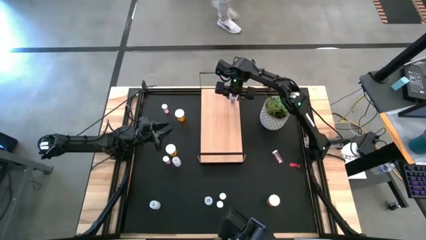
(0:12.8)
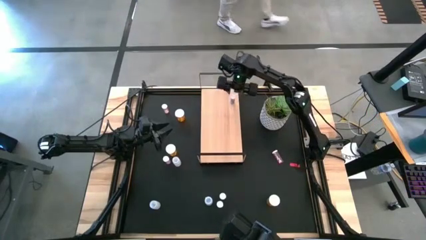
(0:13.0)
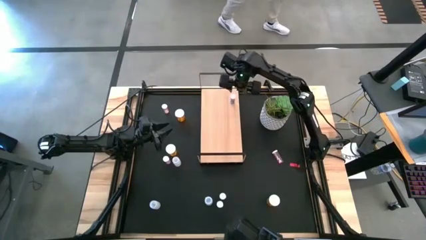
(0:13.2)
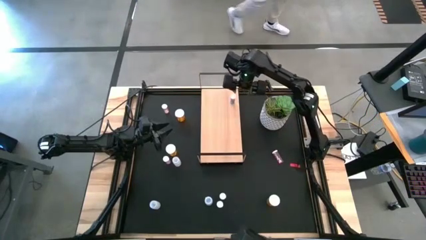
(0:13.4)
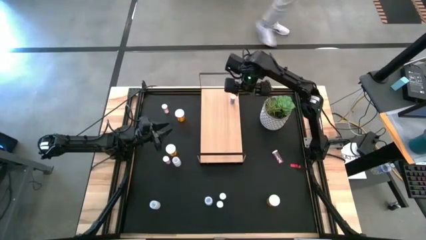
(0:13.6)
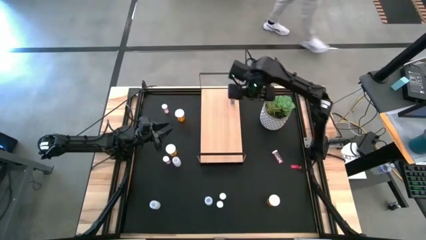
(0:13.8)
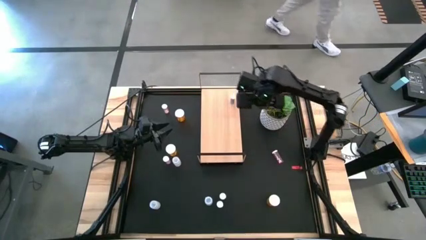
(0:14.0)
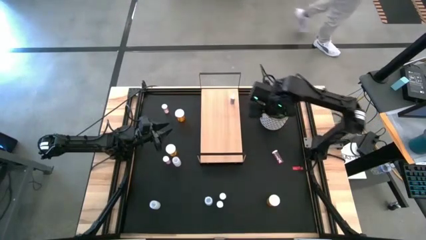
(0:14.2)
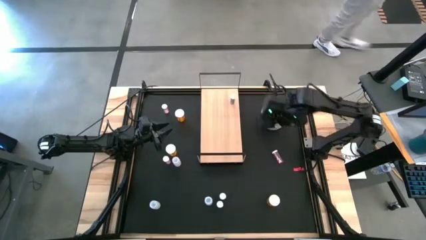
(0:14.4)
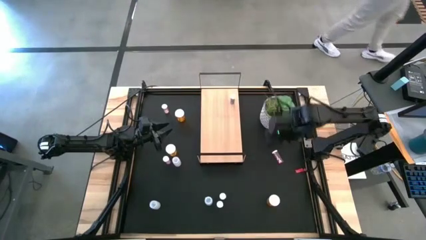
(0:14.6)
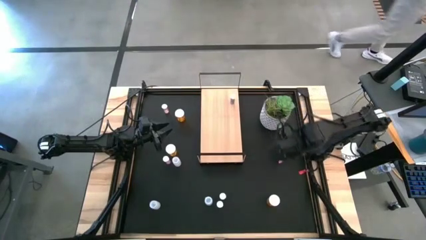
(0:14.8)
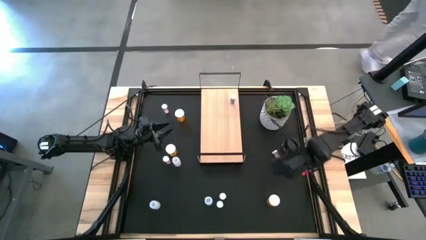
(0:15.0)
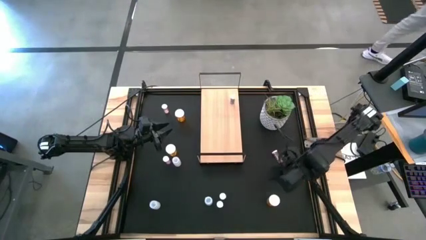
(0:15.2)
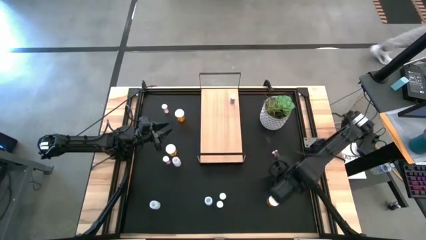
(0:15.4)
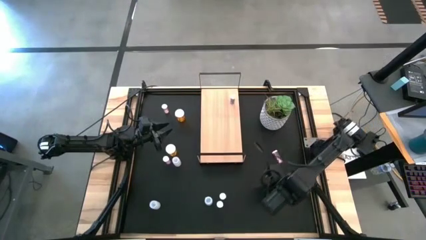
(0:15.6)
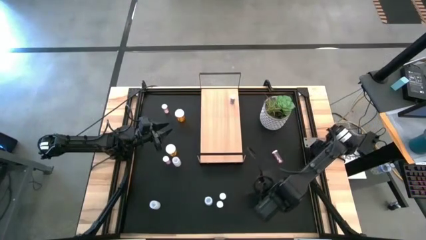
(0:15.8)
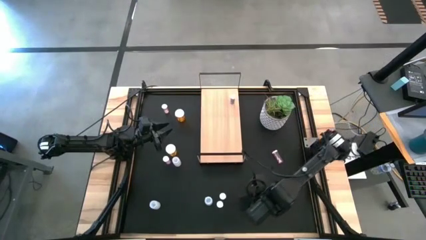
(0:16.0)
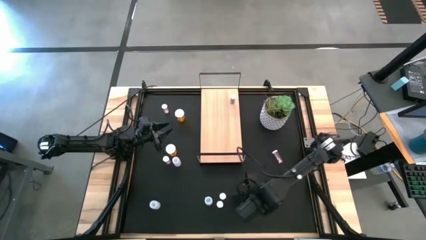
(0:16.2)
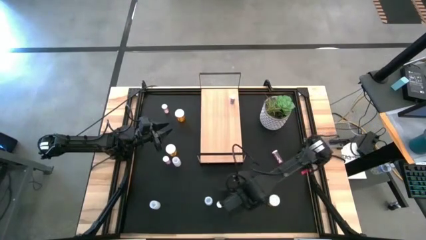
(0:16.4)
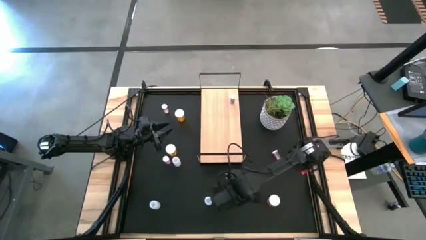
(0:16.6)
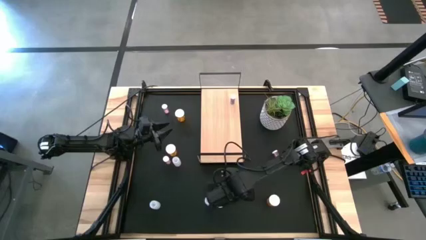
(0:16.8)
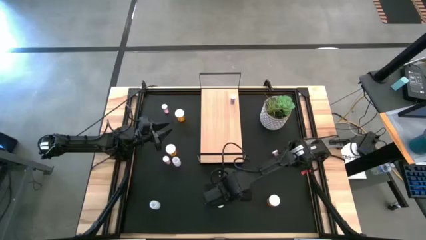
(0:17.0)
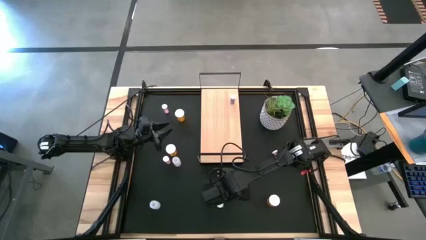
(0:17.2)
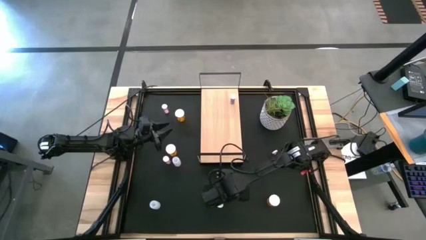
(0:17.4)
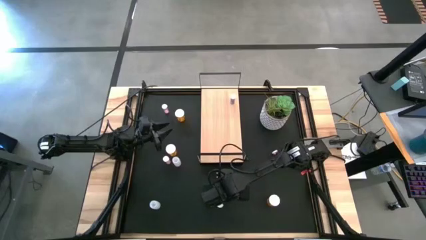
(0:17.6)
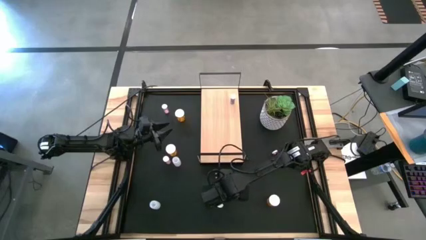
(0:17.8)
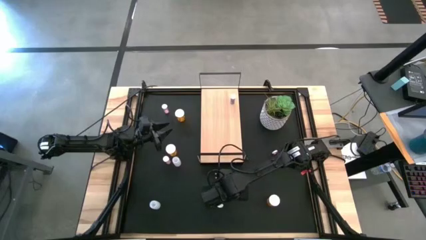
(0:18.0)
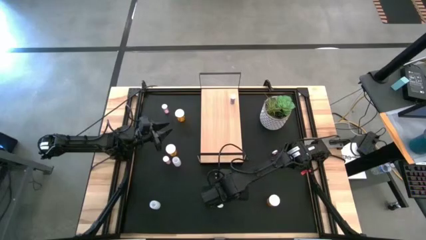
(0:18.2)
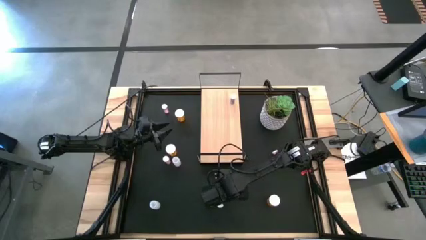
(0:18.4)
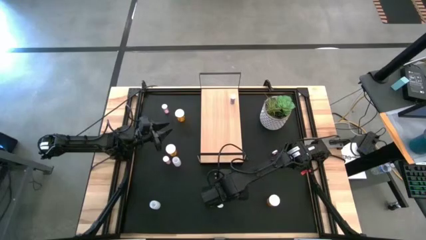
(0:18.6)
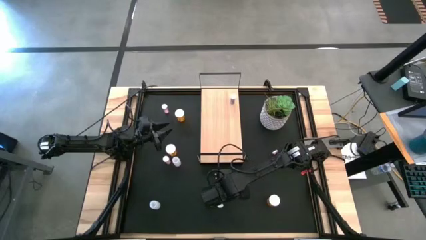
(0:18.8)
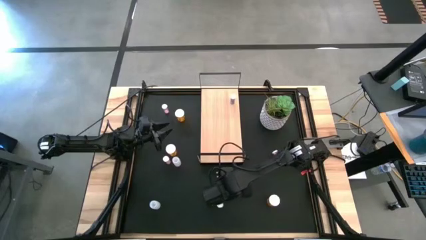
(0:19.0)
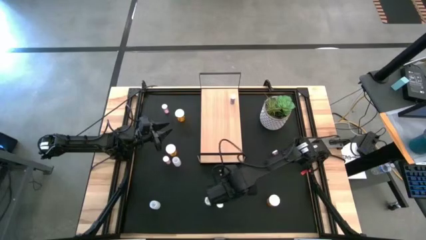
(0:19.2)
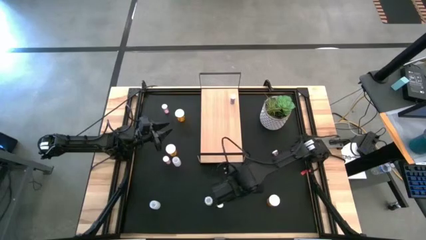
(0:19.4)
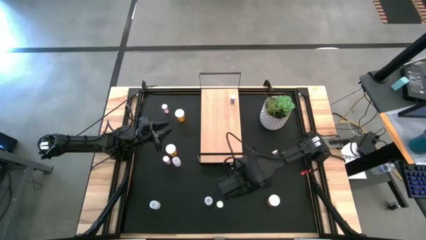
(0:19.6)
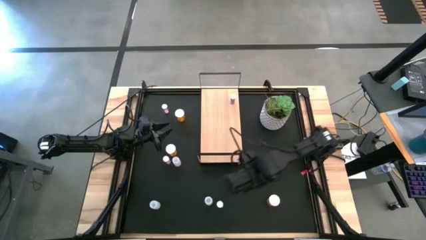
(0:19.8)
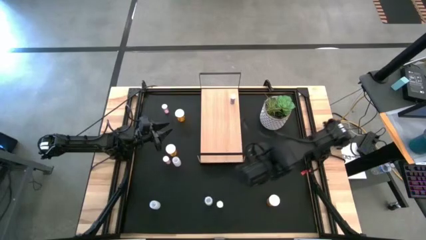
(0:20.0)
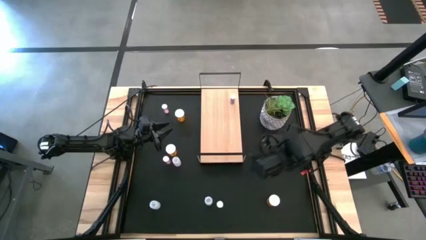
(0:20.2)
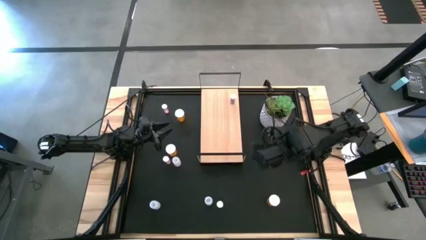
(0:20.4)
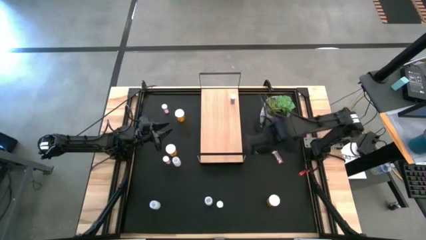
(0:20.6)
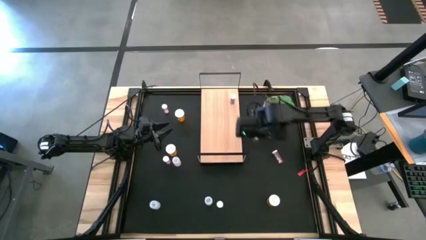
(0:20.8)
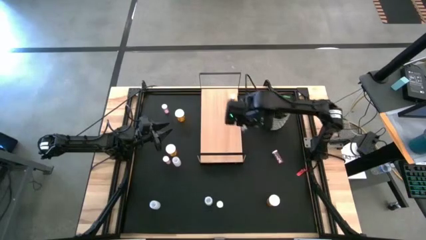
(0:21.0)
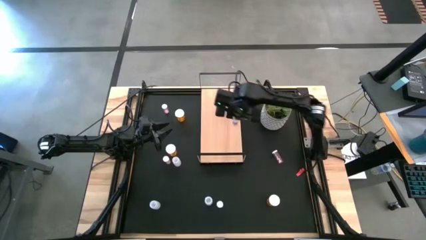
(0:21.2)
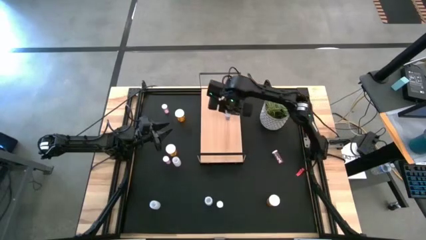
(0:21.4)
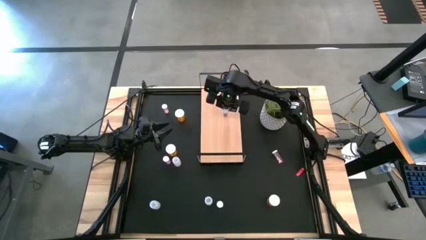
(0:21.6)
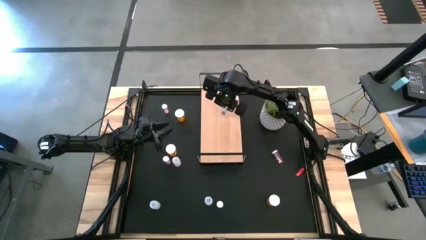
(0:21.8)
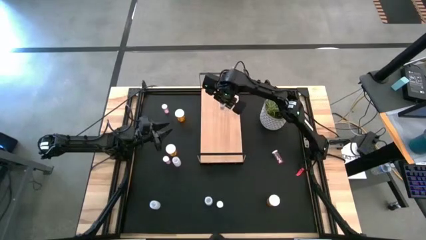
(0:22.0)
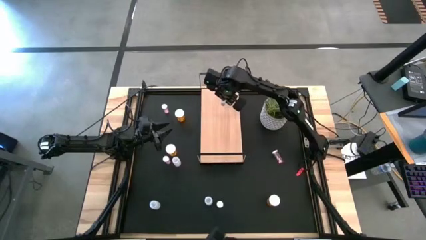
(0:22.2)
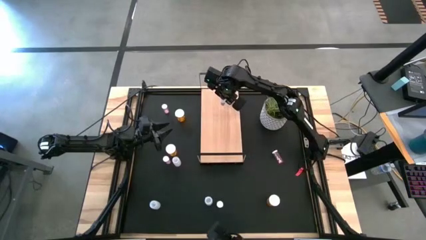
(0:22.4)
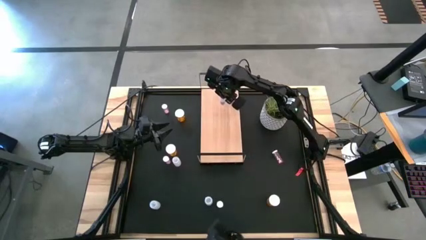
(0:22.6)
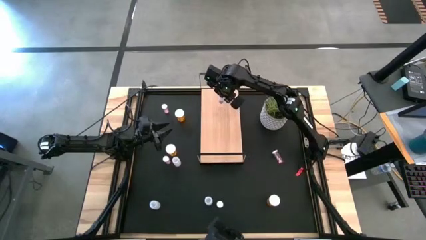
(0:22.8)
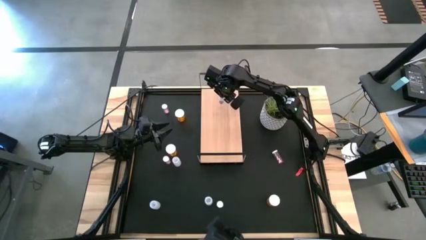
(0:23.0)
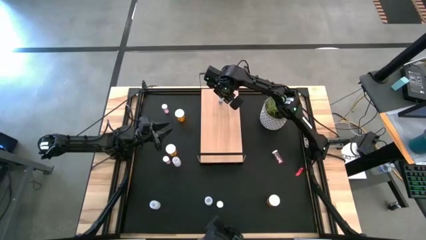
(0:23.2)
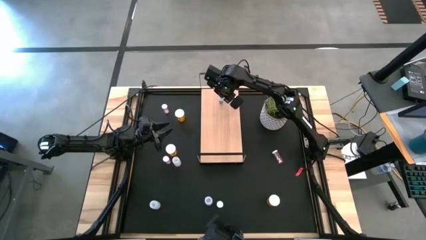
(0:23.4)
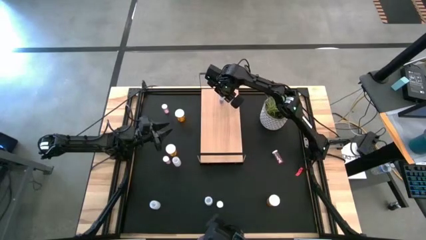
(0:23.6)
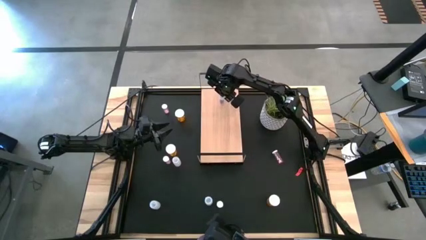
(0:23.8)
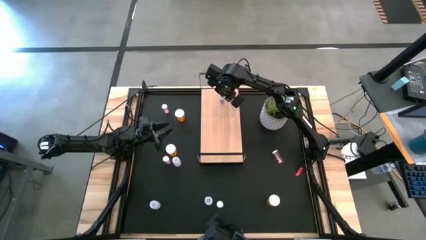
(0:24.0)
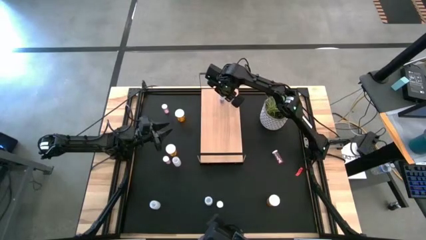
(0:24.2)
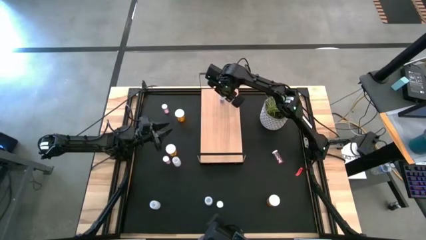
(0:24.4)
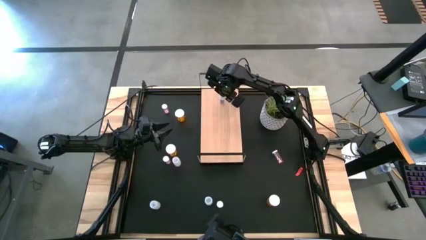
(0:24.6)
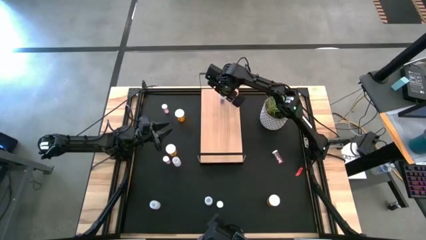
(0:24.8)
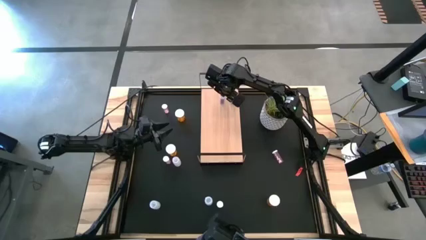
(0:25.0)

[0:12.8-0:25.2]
Task: Pick and place medicine bottles onto shelf by color
Put the top blue pill bottle on the shelf aligned with the blue pill bottle

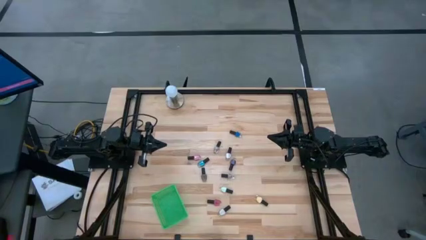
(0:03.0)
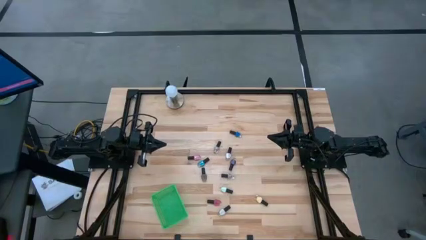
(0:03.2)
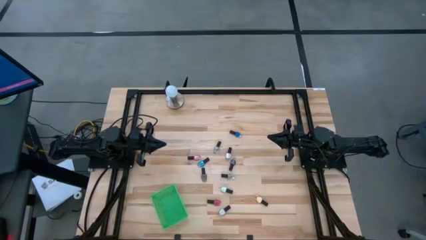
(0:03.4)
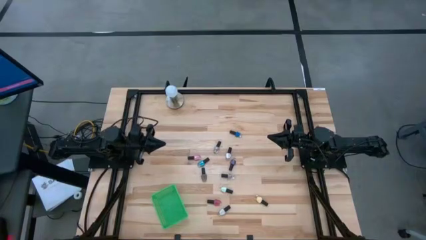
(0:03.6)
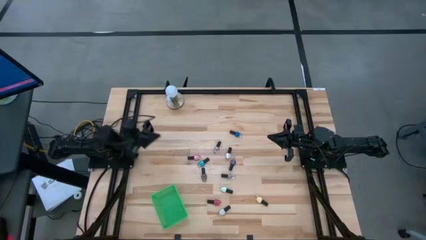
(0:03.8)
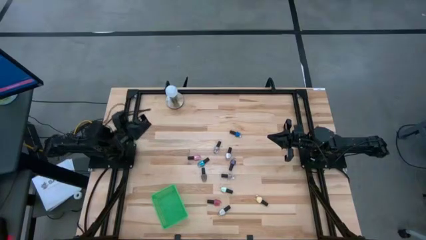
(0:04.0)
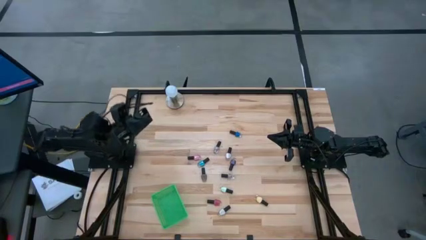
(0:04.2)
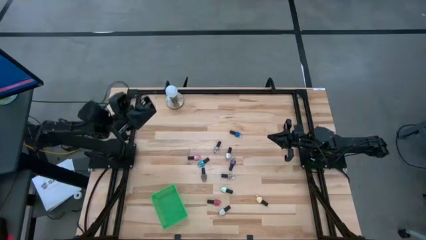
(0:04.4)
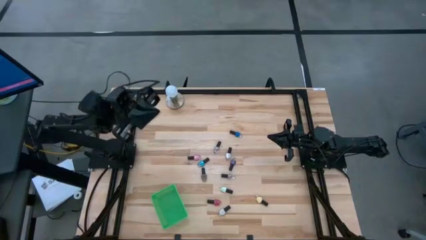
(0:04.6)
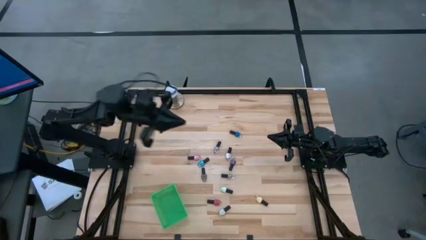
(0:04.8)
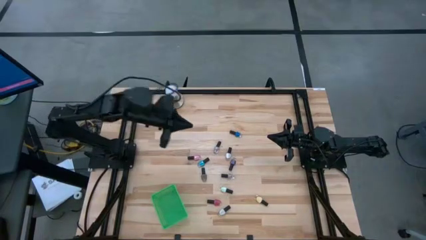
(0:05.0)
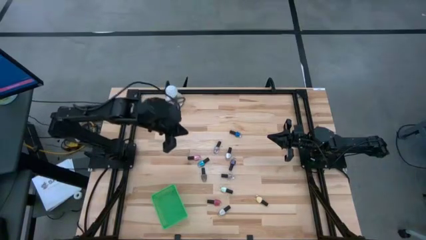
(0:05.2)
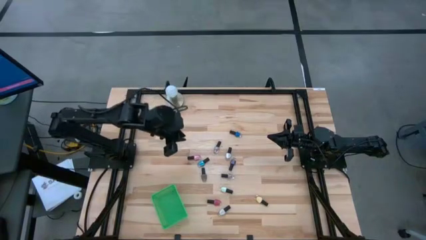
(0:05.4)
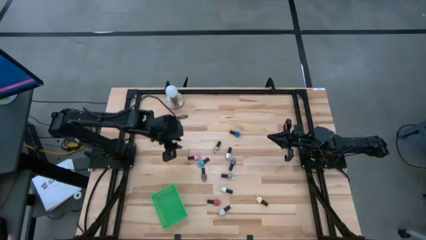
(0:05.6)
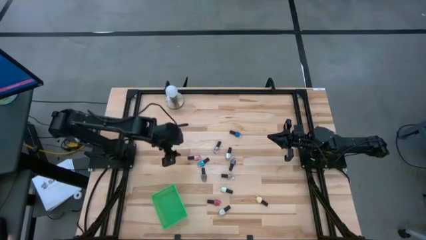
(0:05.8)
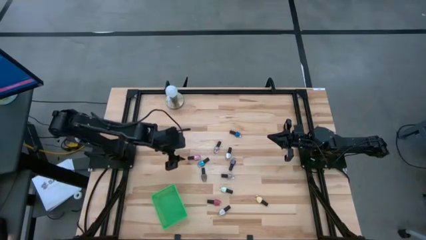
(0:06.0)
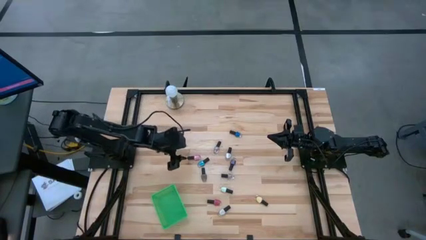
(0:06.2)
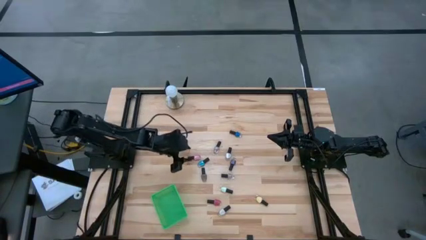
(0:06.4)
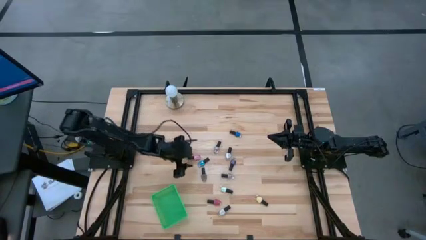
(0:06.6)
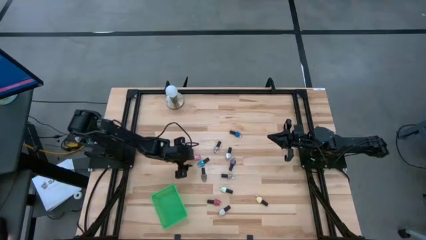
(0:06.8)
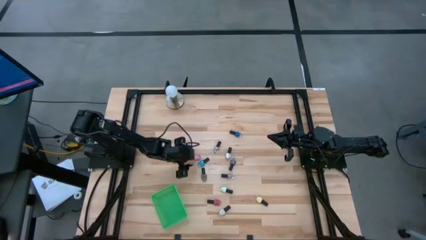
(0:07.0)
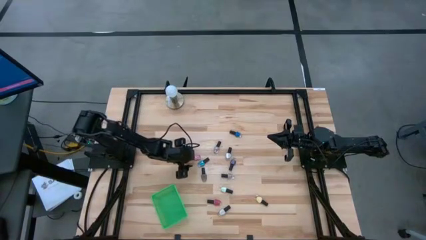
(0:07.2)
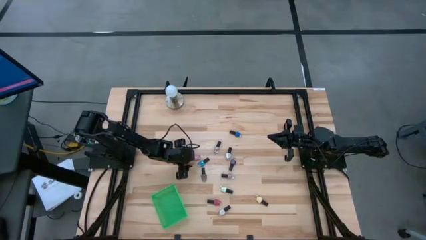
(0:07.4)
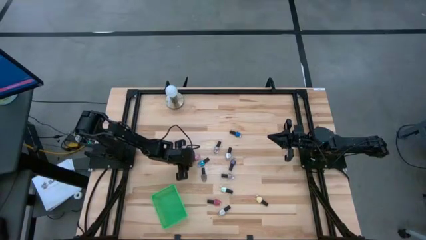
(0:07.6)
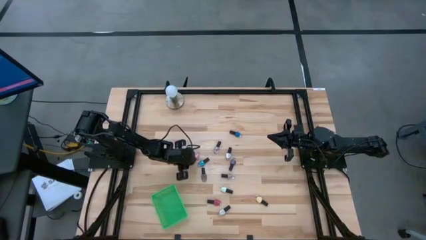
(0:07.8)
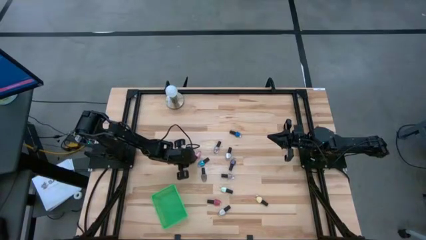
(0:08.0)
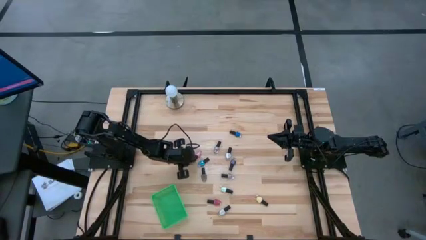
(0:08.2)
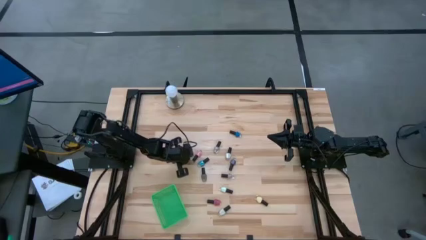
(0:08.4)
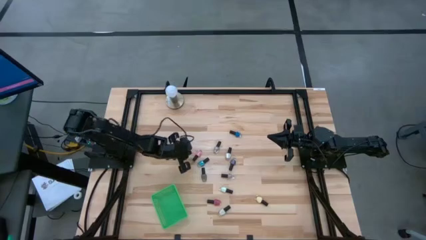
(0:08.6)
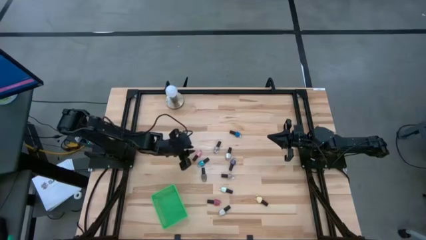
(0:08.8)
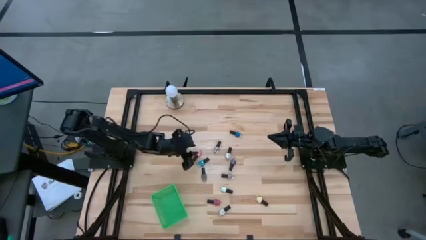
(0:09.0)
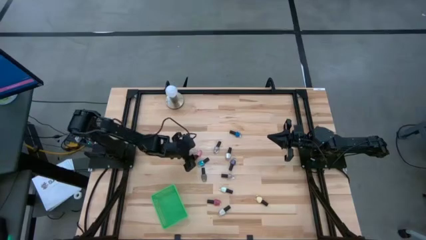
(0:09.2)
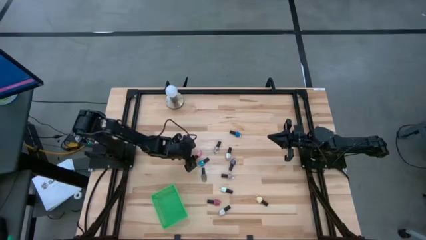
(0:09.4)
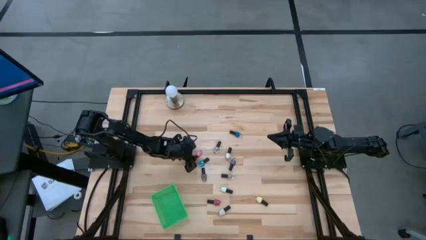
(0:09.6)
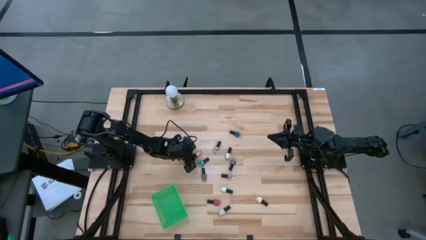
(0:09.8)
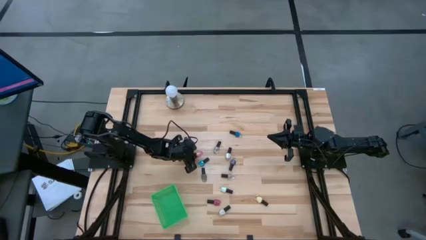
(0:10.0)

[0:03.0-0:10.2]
Task: Pick & Place Nail Polish
Put the black pink nail polish bottle into the green basket
